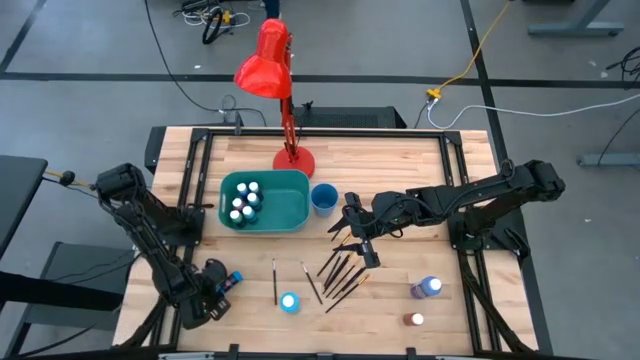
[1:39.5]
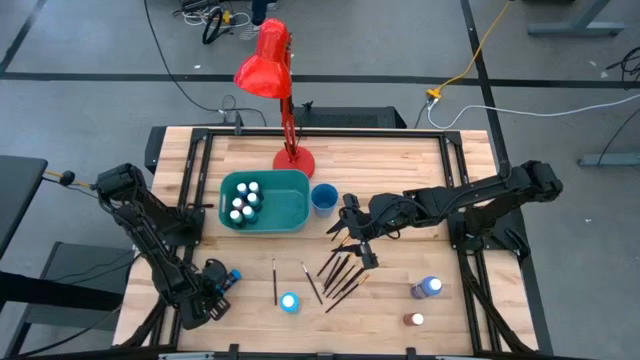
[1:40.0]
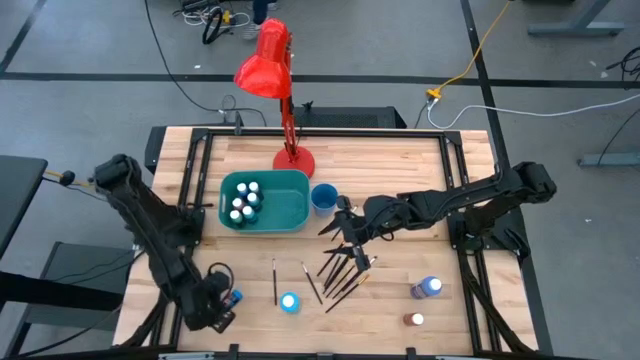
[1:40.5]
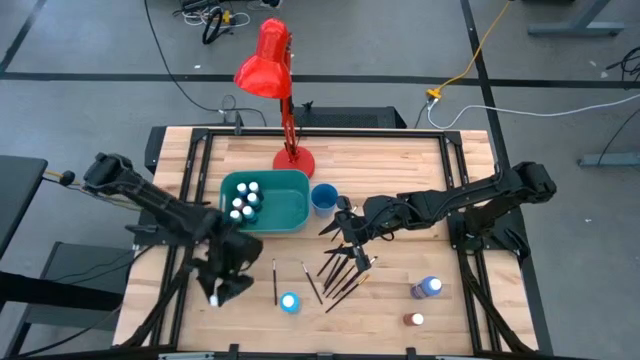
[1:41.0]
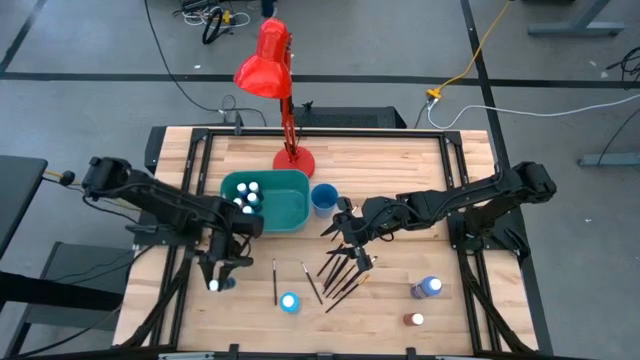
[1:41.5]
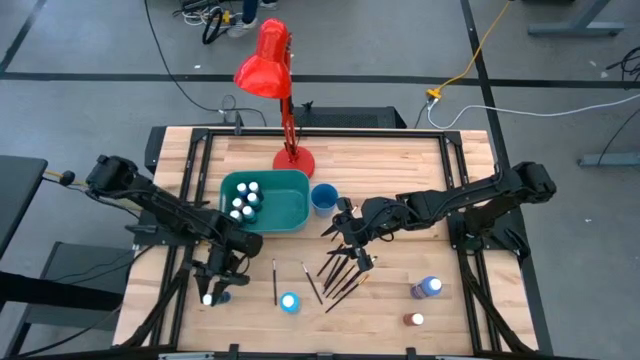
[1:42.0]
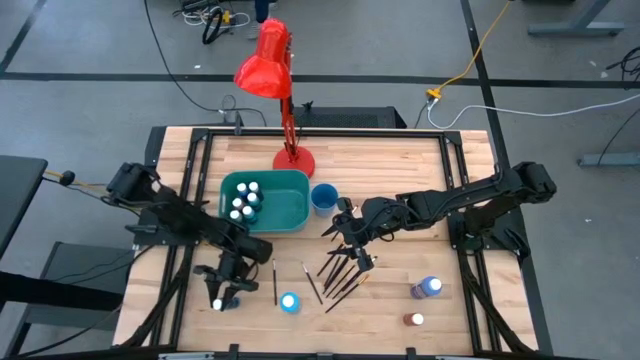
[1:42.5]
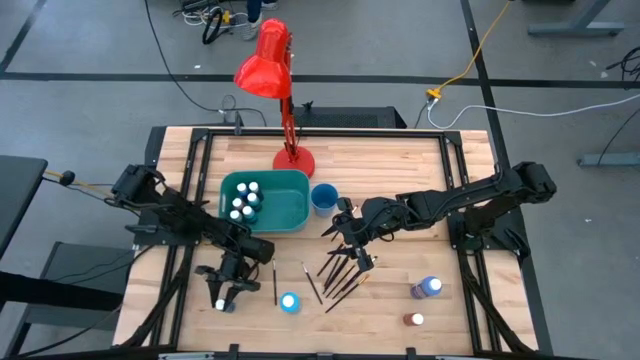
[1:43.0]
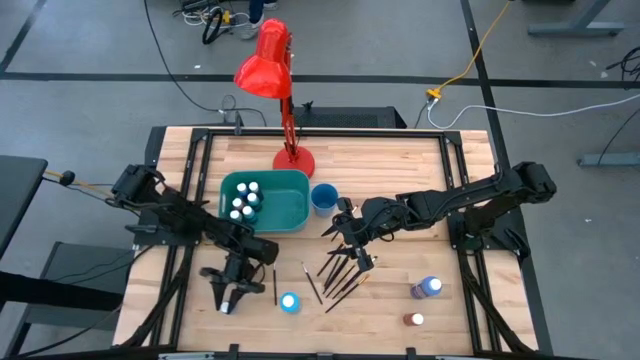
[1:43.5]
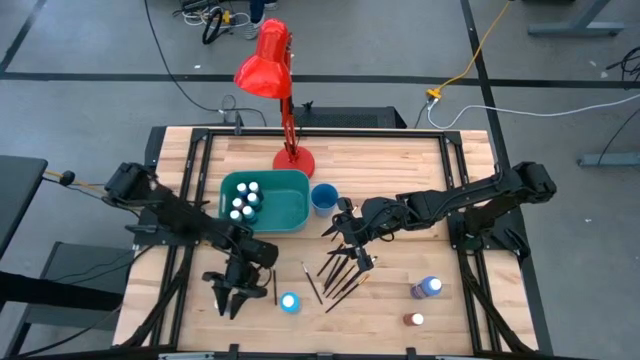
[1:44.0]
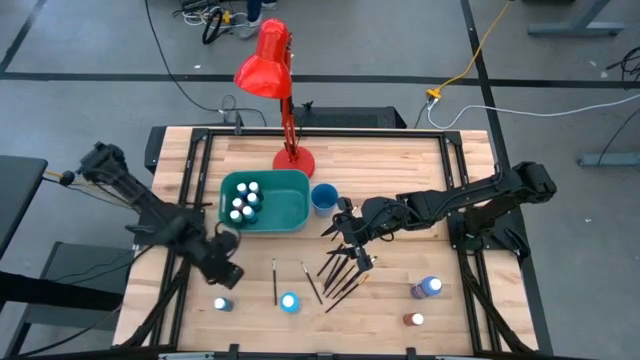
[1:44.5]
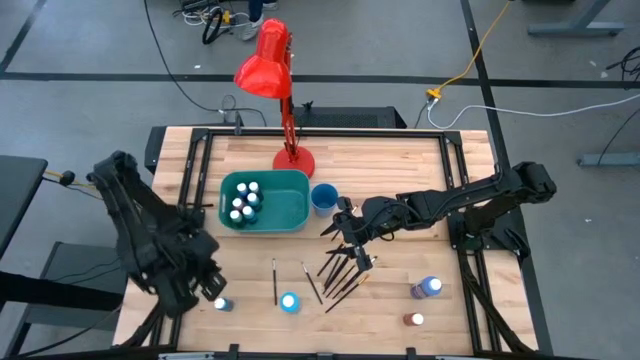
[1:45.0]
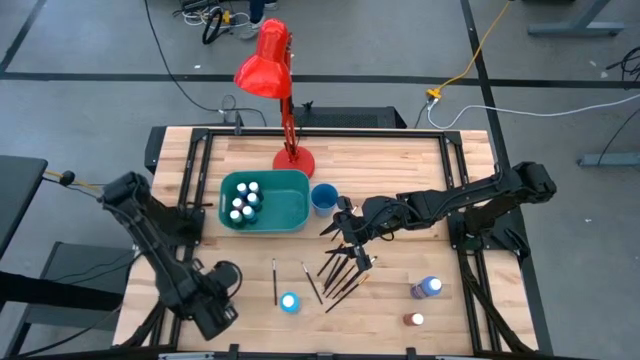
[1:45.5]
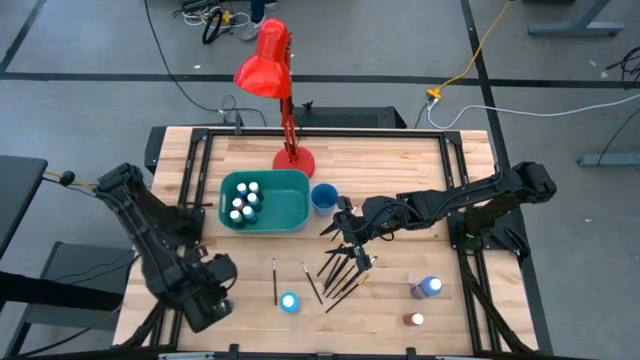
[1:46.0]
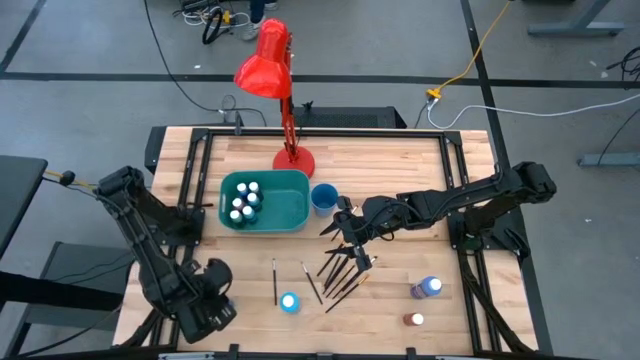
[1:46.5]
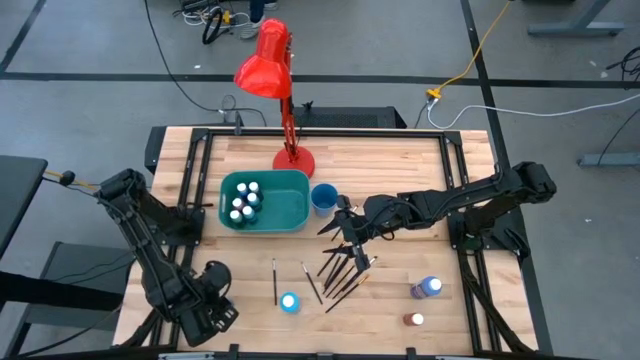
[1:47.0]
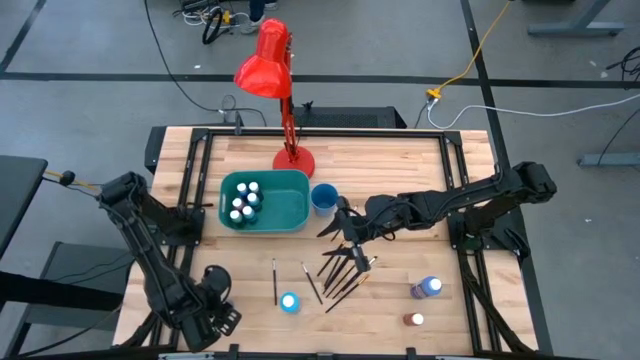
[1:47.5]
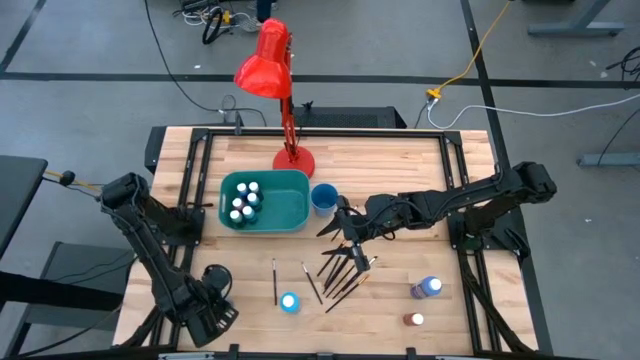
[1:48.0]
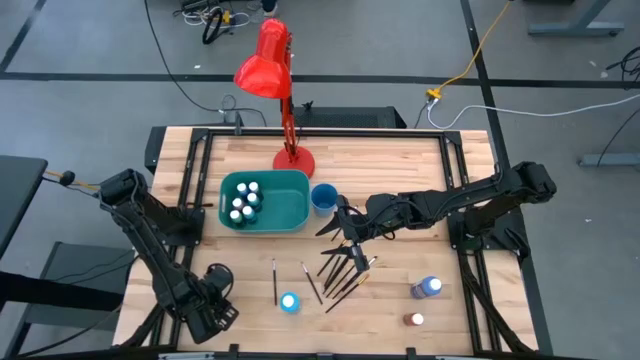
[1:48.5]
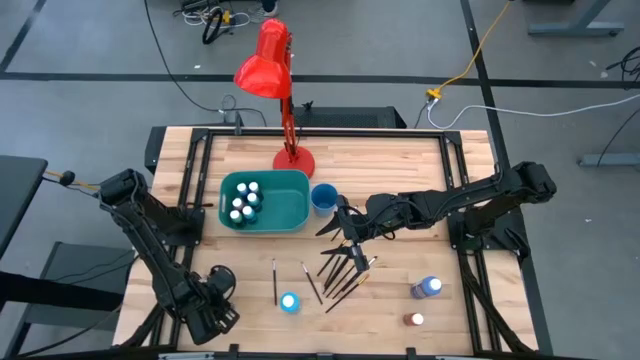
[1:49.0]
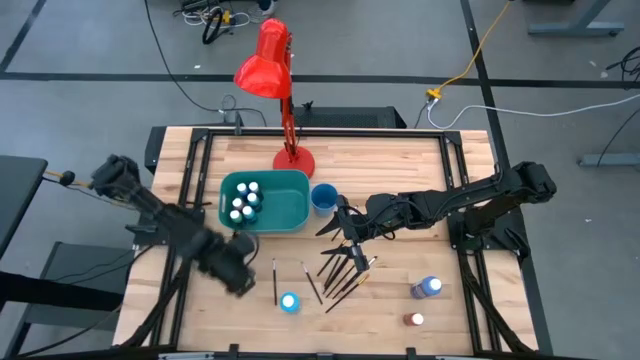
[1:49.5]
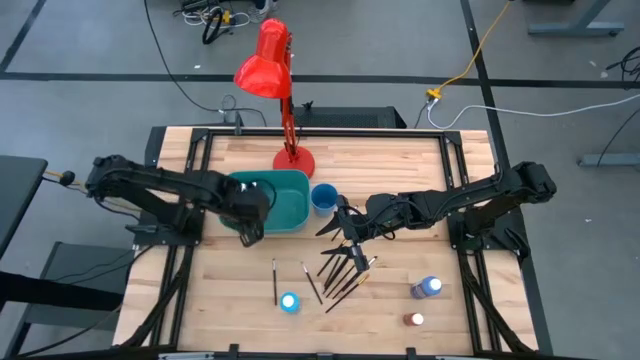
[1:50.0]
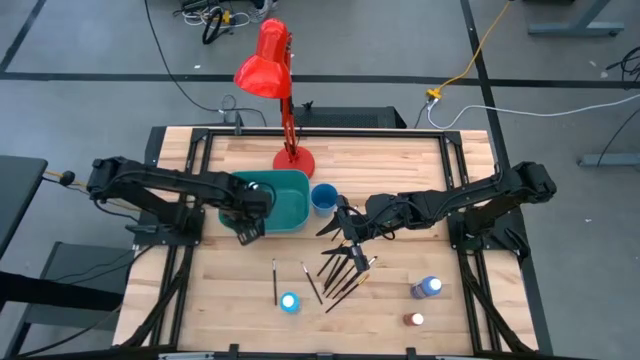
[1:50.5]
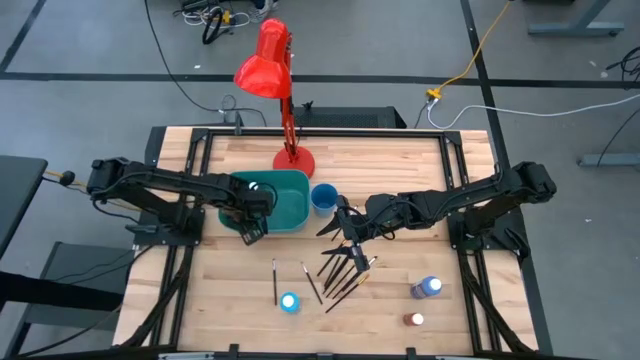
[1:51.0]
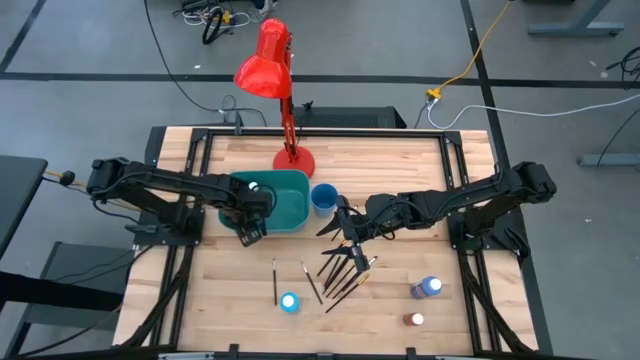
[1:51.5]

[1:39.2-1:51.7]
Task: Pick & Place Paint Supplies
Put the light blue paint bottle into the green bin

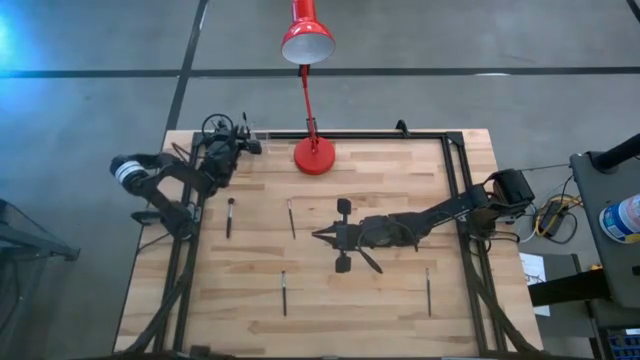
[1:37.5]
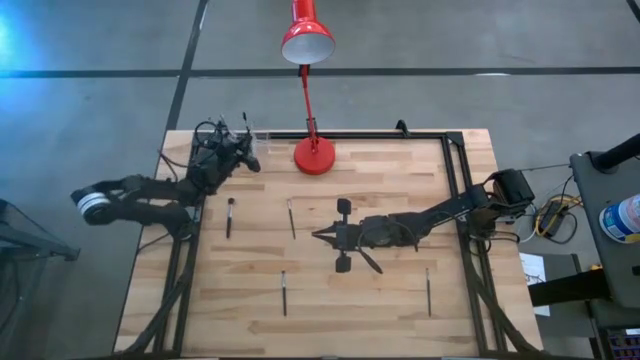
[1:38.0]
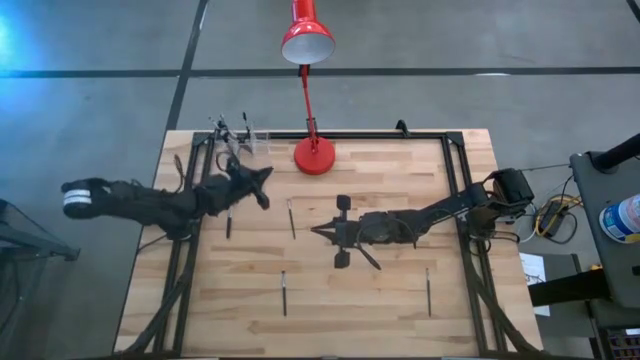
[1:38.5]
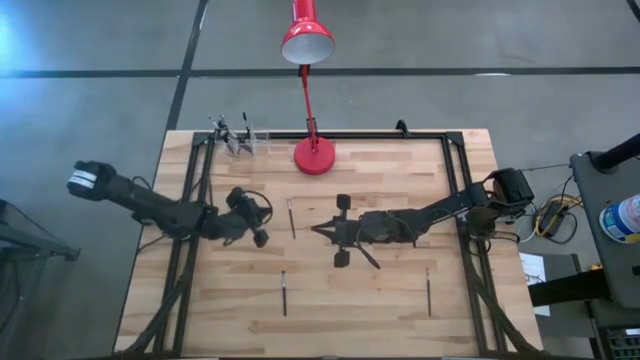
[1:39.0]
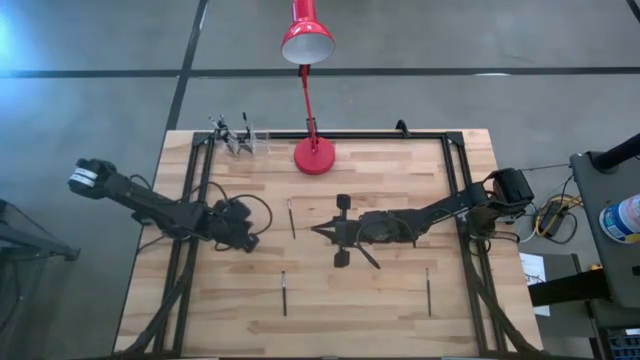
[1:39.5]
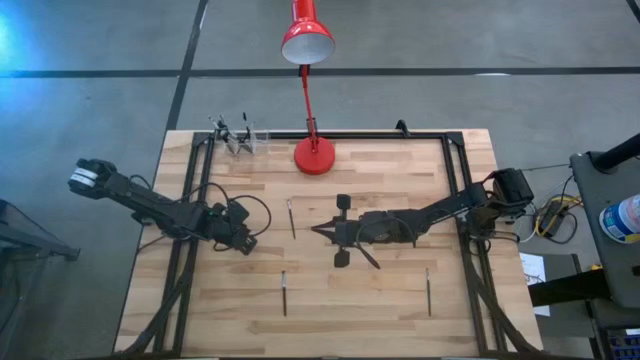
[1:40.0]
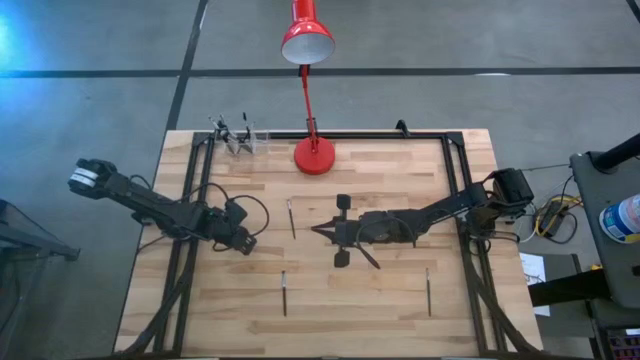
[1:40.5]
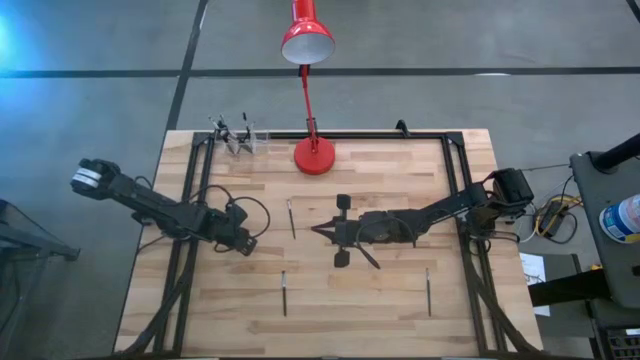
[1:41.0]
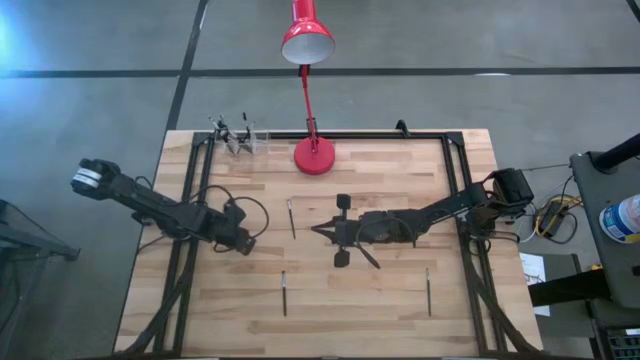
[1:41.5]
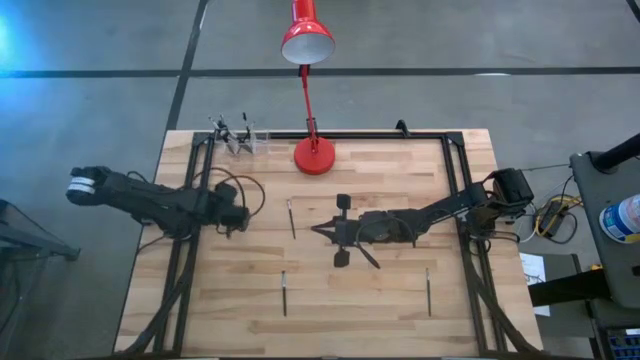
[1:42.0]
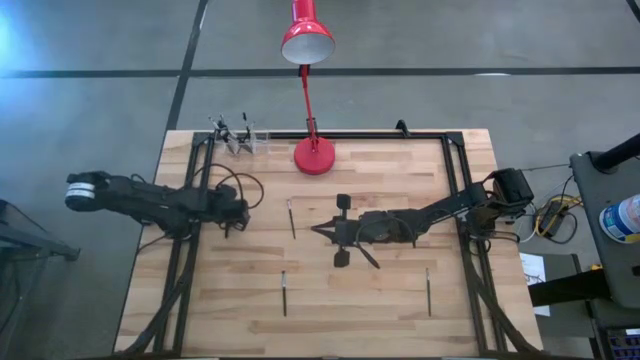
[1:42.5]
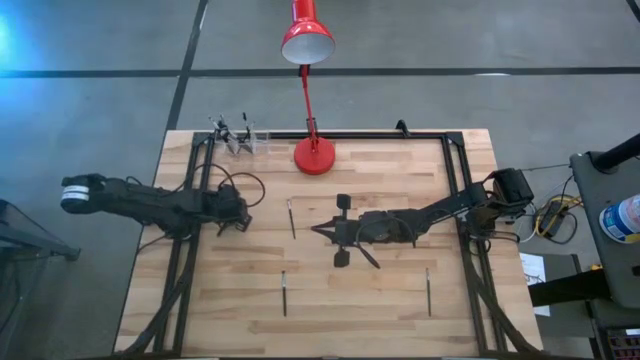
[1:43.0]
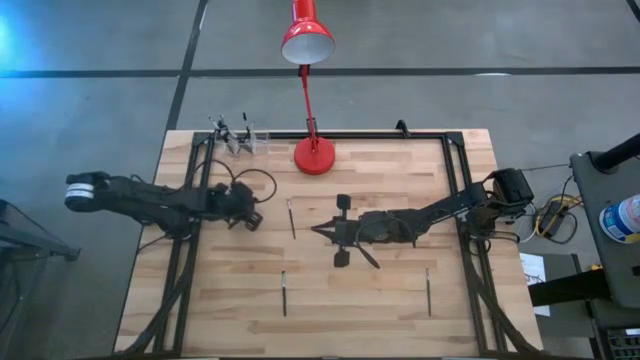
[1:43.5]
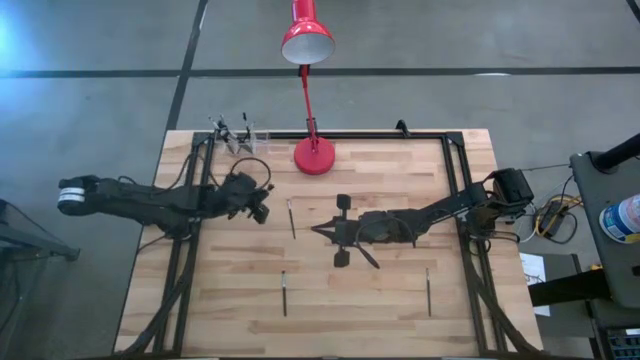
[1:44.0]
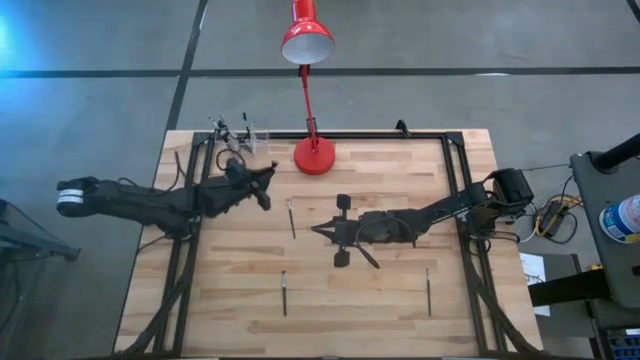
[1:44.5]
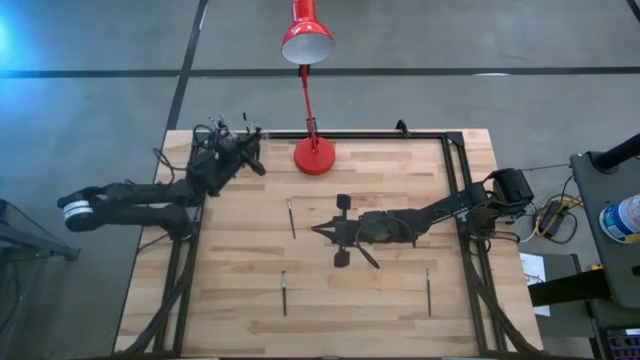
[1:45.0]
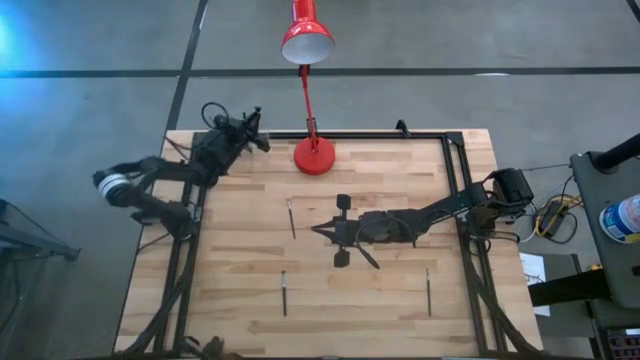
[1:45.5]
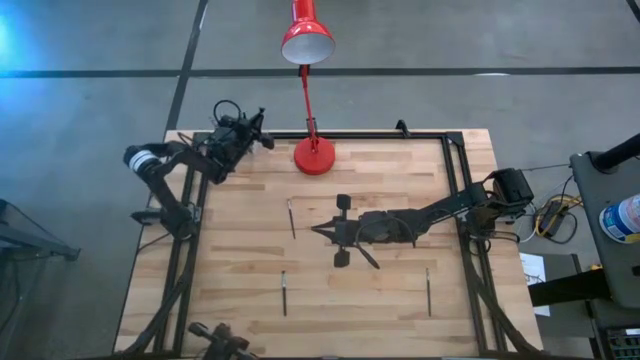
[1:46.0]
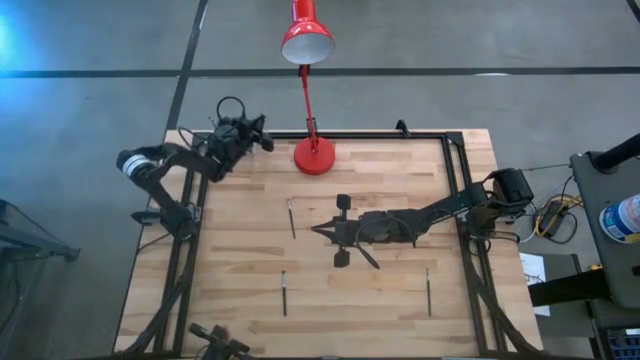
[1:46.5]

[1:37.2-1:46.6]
Task: Pick & Place Makeup Supplies
Put the makeup brush into the transparent organizer
